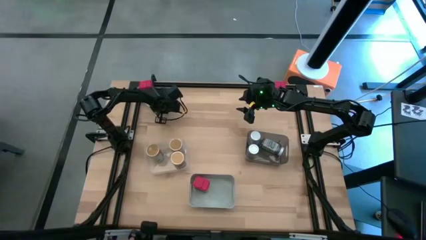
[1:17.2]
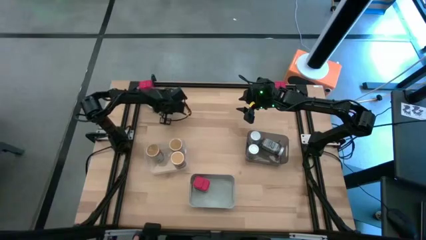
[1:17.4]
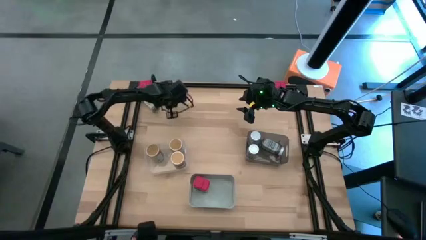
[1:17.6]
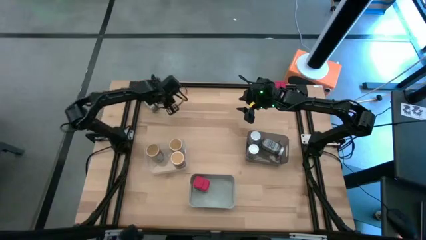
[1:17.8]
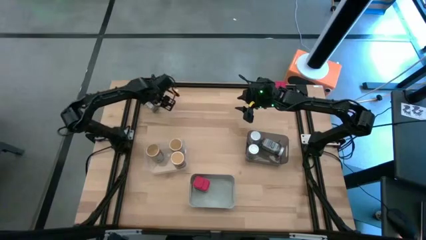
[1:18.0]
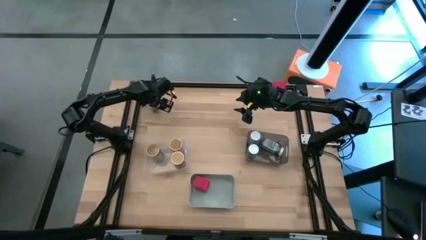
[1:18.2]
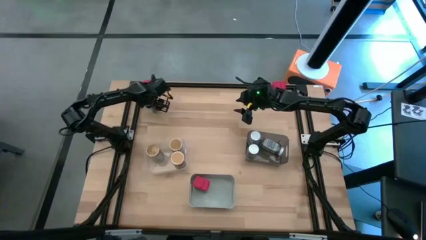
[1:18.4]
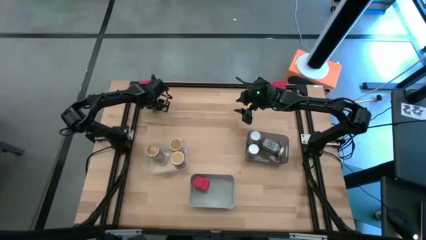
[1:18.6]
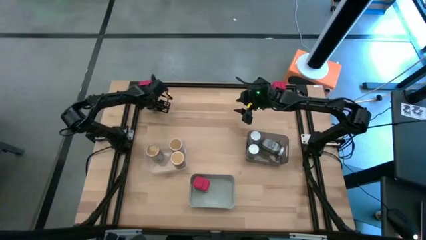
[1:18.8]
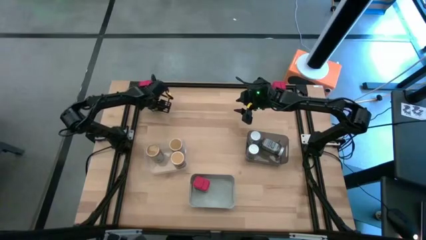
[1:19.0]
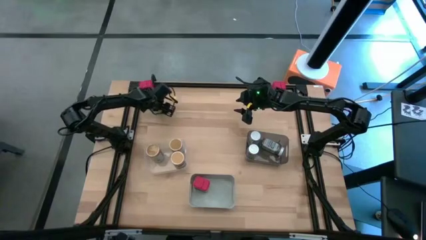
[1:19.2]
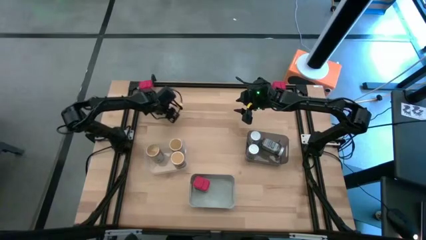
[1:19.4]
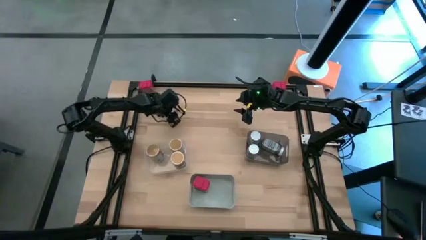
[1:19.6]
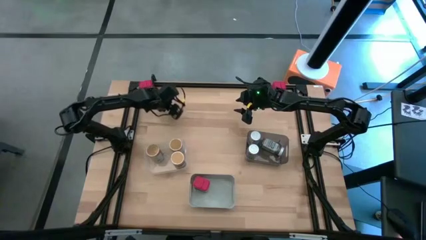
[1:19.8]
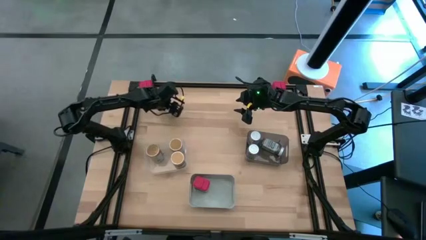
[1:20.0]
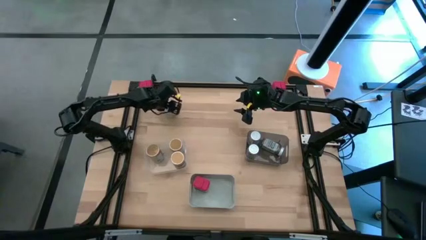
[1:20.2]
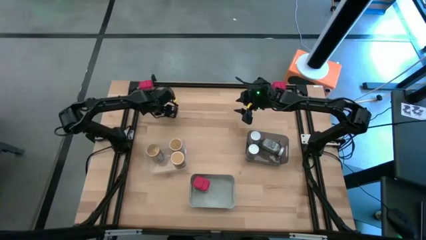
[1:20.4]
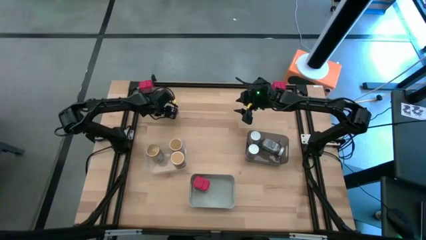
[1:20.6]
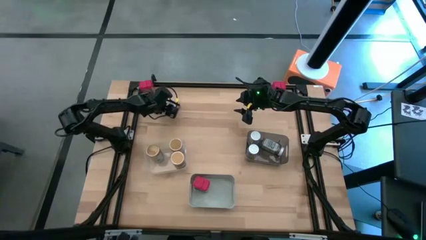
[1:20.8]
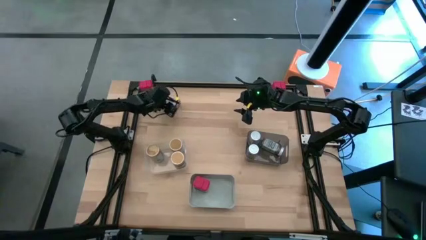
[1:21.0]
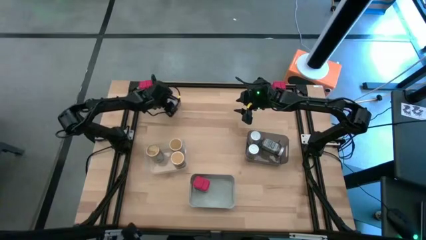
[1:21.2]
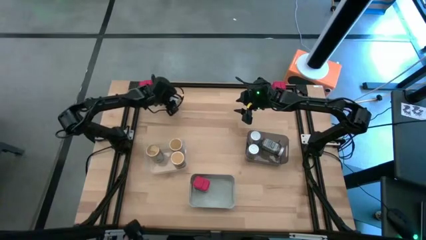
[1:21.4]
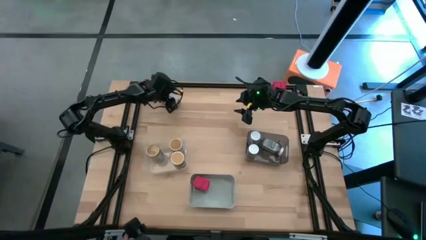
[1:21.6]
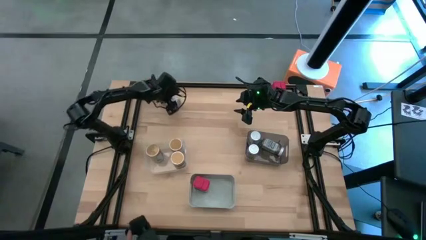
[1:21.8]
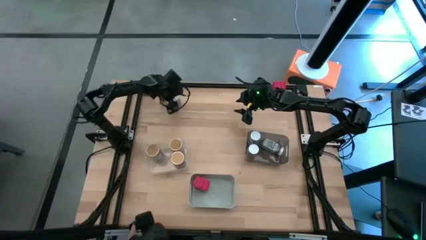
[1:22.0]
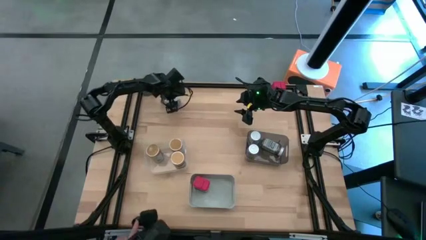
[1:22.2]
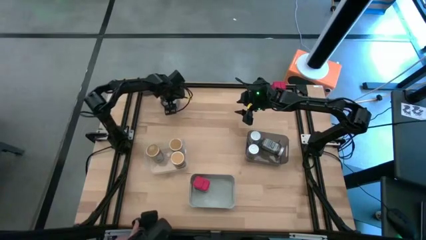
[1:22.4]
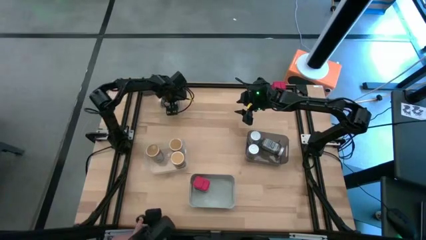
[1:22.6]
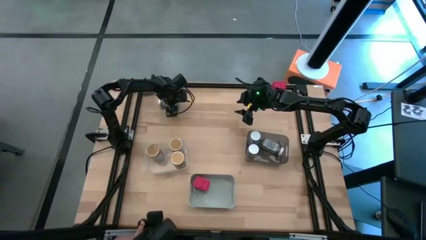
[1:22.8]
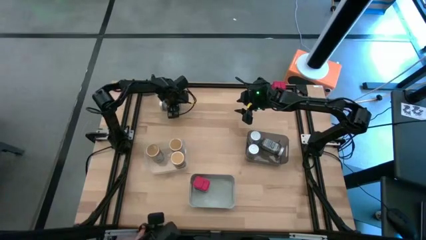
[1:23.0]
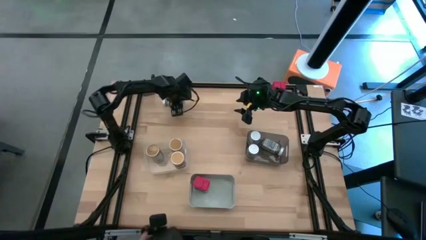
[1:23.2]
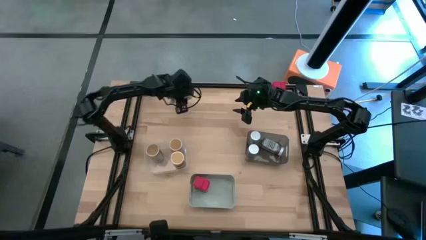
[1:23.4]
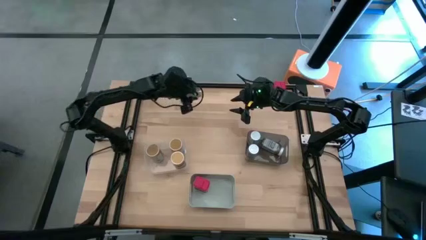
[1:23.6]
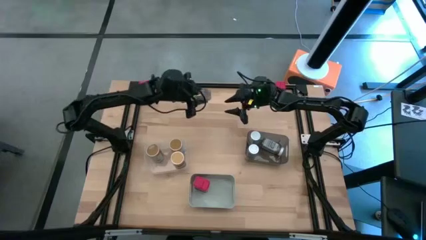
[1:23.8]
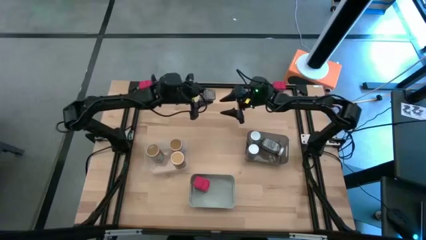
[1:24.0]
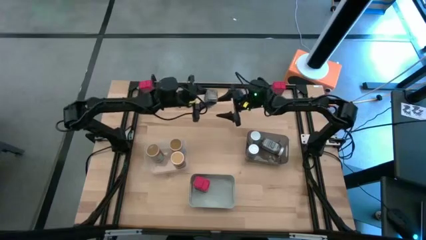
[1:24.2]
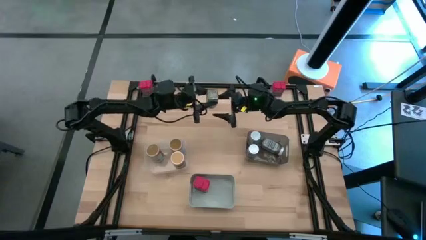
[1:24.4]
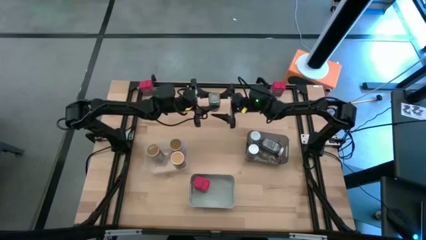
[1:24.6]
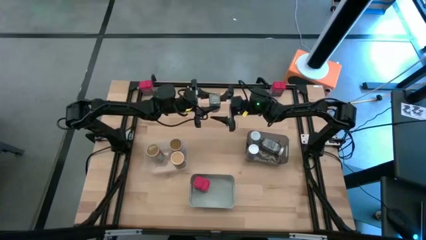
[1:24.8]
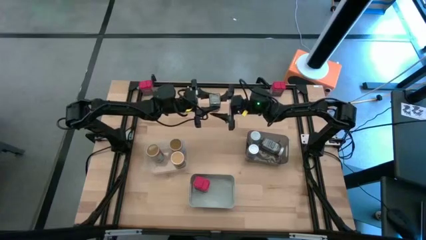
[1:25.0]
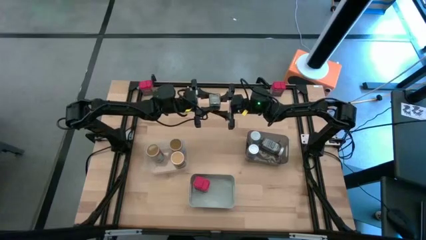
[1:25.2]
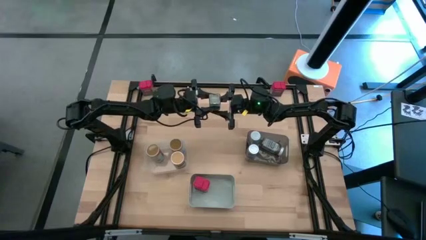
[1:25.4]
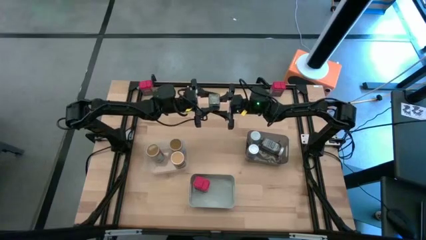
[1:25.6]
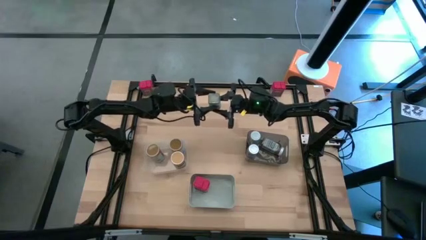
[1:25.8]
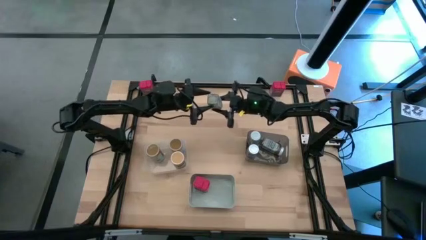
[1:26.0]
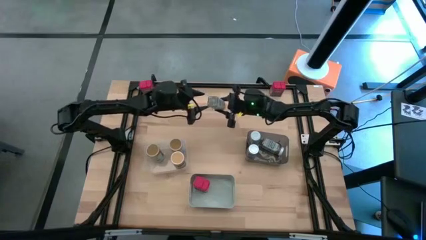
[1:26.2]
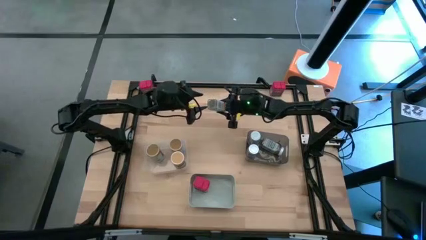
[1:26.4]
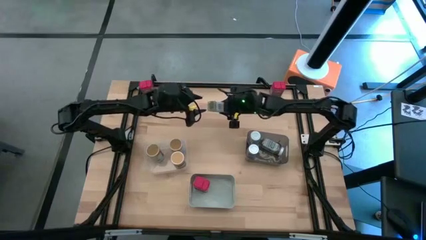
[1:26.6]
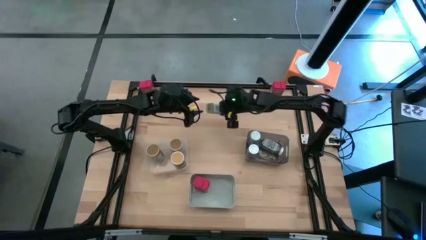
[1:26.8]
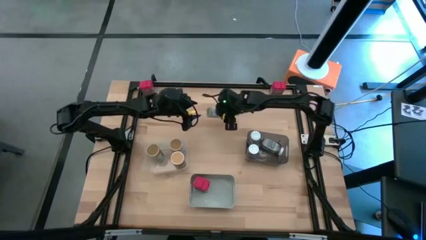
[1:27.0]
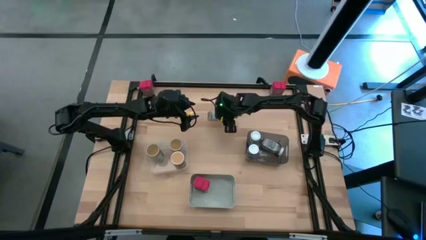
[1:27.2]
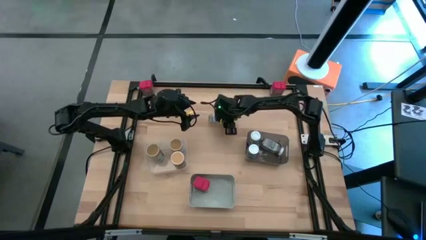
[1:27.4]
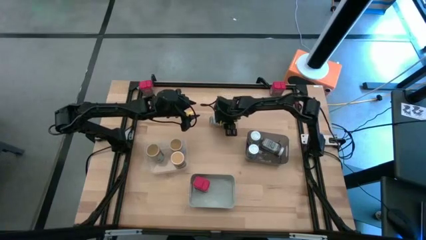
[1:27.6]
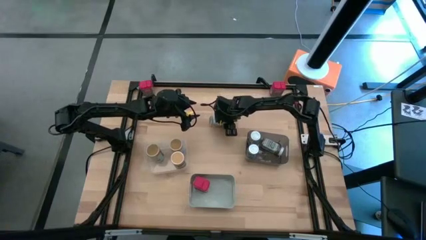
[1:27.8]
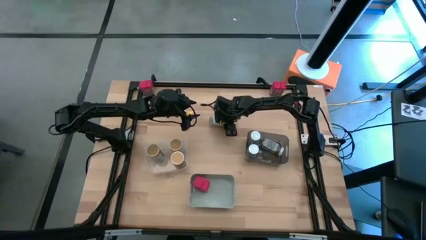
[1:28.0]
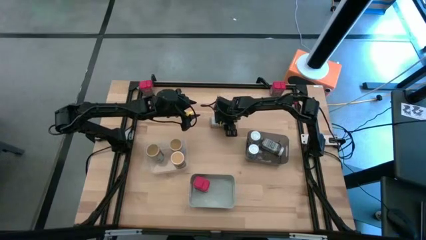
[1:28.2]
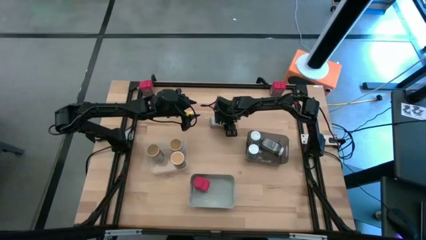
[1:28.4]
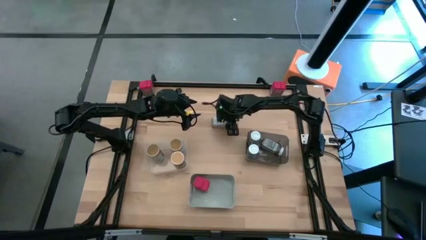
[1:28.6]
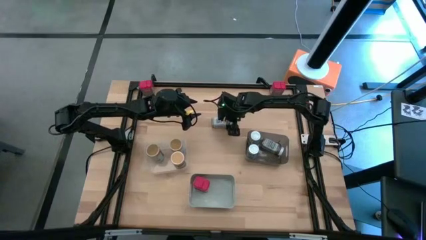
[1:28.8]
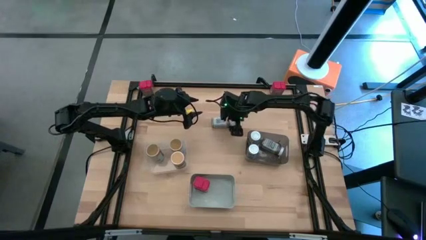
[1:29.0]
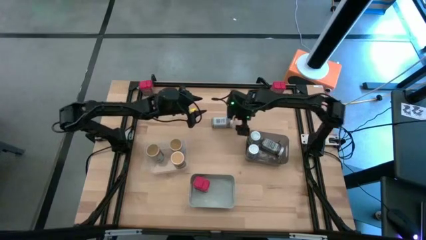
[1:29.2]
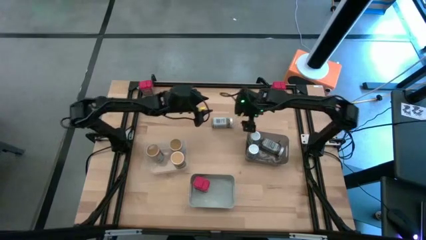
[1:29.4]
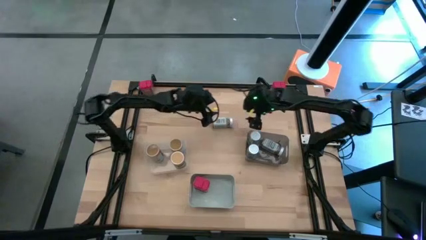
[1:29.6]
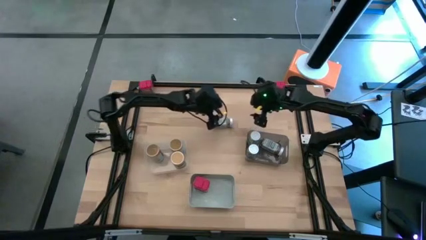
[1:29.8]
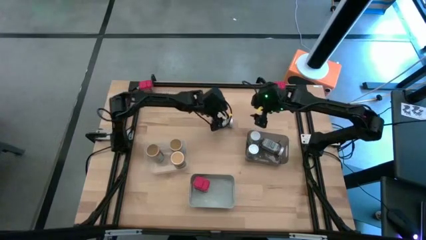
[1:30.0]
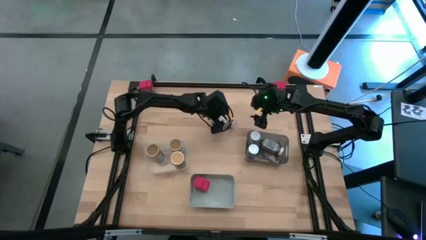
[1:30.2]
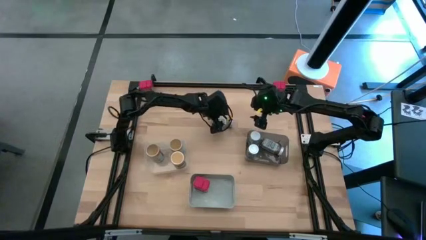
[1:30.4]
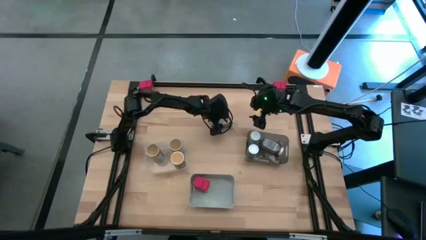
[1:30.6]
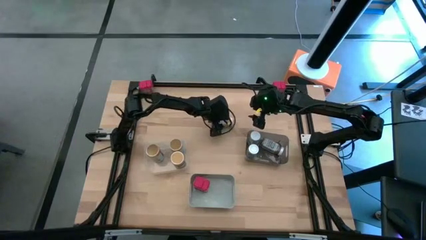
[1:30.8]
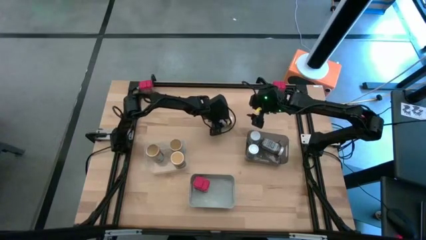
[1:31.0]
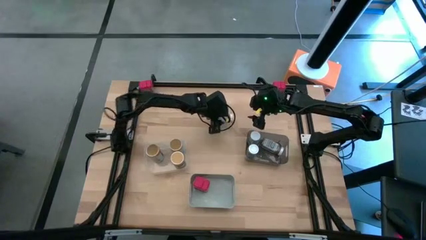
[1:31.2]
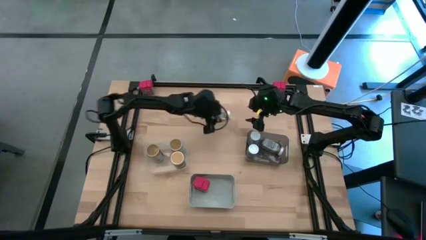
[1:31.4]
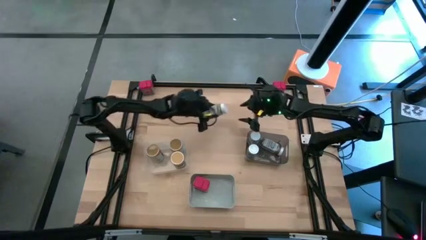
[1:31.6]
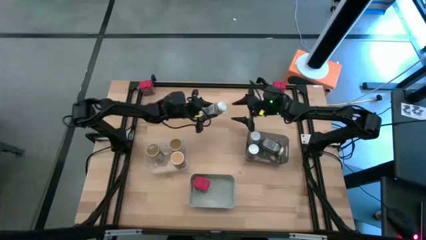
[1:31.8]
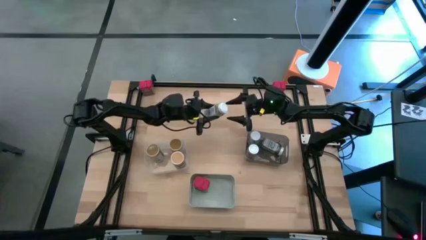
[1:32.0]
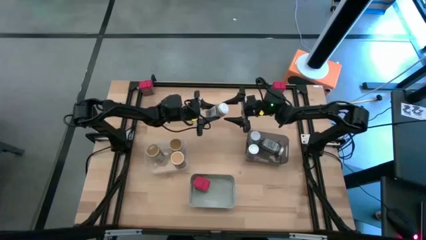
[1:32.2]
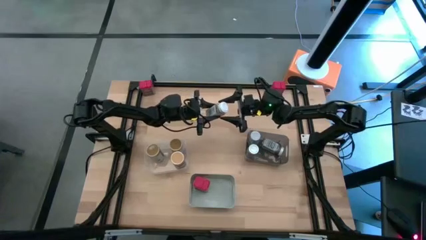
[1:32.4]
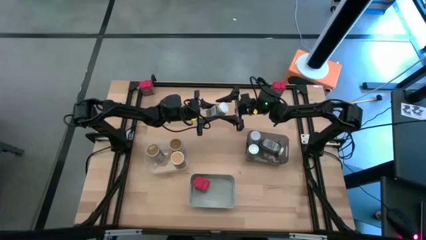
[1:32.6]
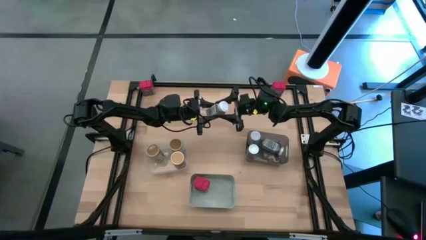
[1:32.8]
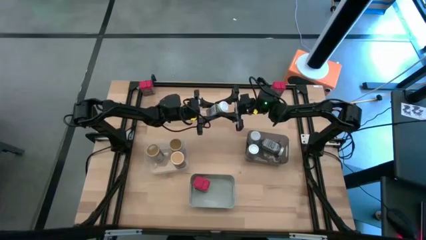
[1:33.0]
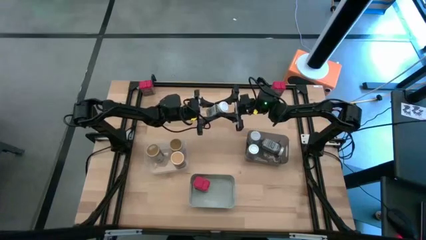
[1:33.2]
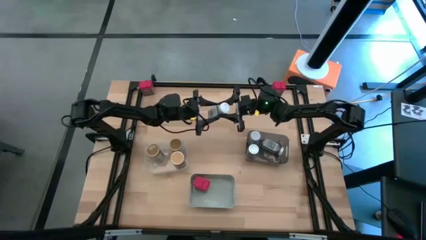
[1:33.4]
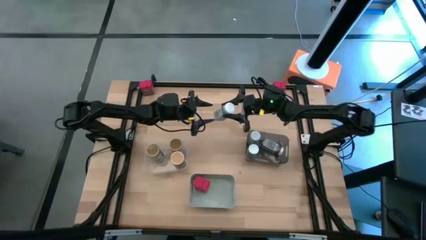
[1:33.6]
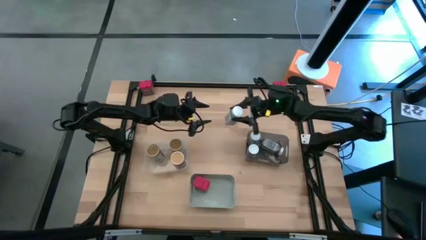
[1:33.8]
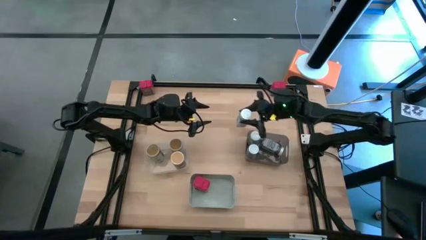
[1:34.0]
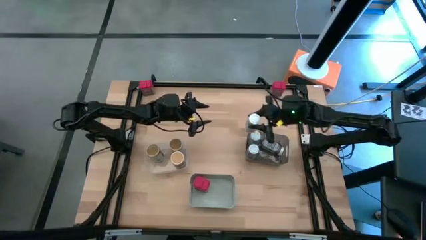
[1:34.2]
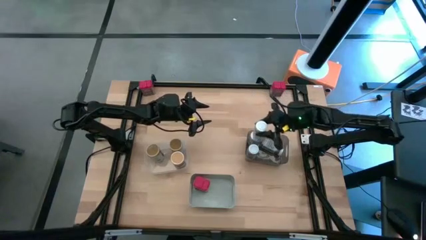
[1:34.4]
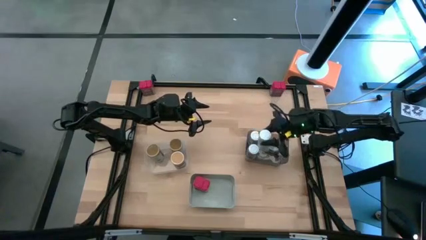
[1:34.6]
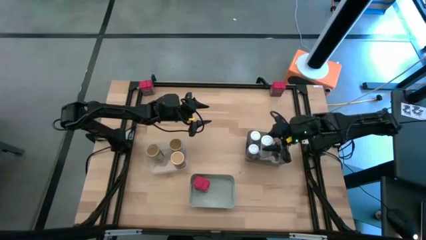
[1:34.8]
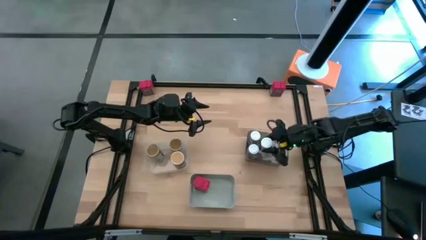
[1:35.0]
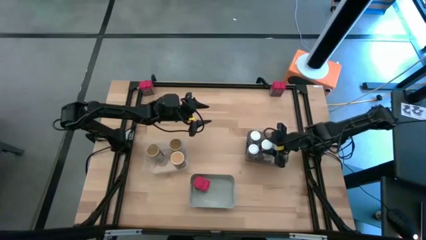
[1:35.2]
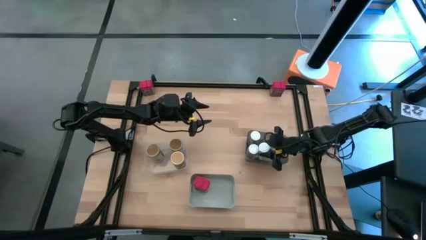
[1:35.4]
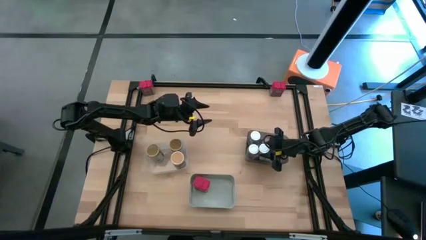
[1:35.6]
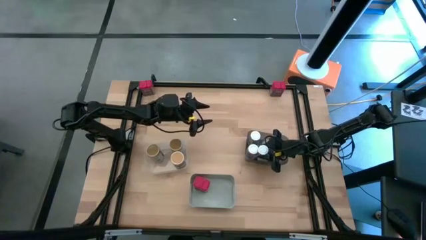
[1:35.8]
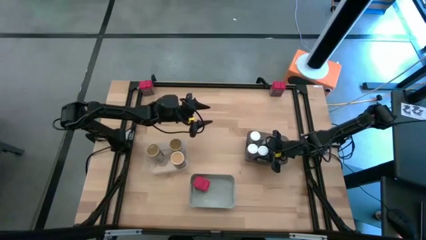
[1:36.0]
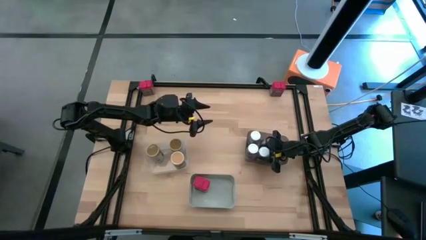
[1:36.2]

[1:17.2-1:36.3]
Task: Sort spices by type
Put the white seasoning bottle into the black bin
